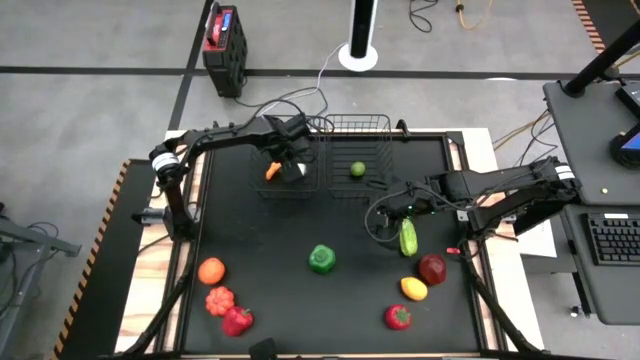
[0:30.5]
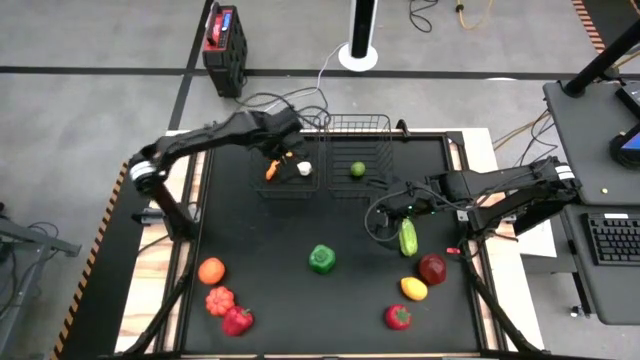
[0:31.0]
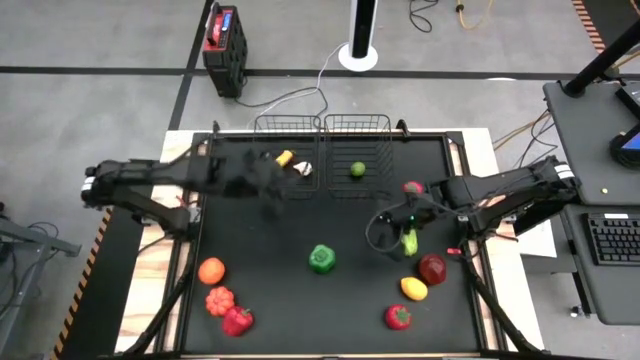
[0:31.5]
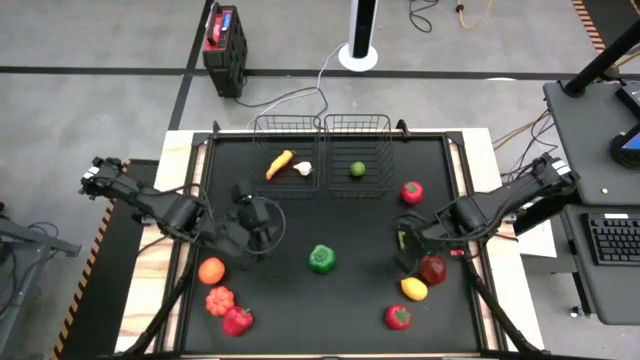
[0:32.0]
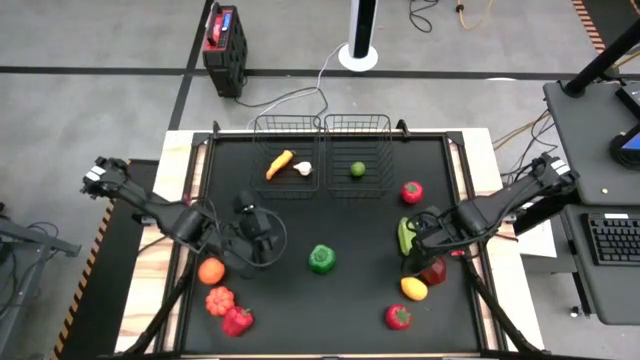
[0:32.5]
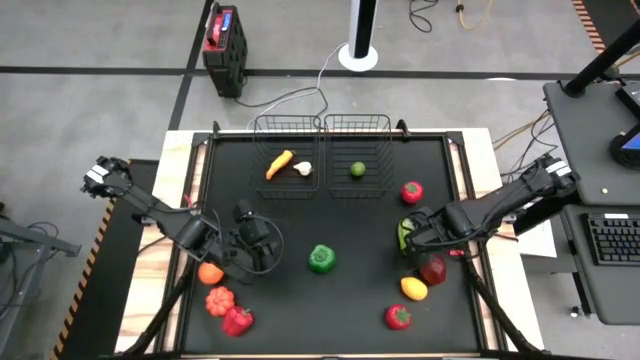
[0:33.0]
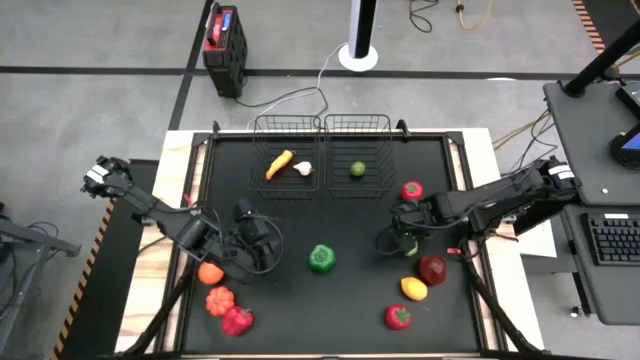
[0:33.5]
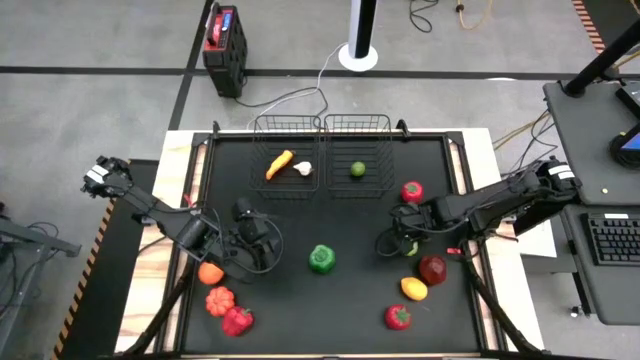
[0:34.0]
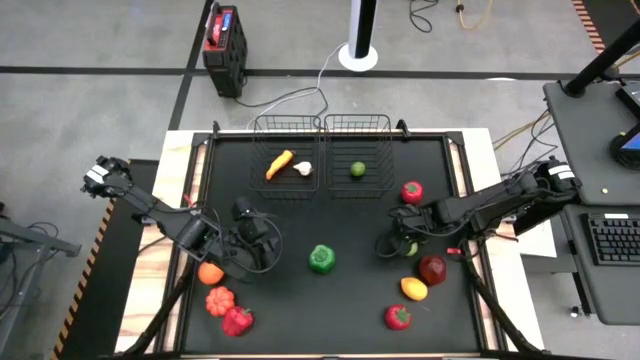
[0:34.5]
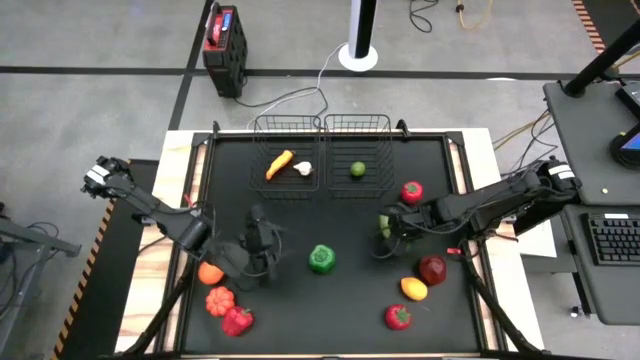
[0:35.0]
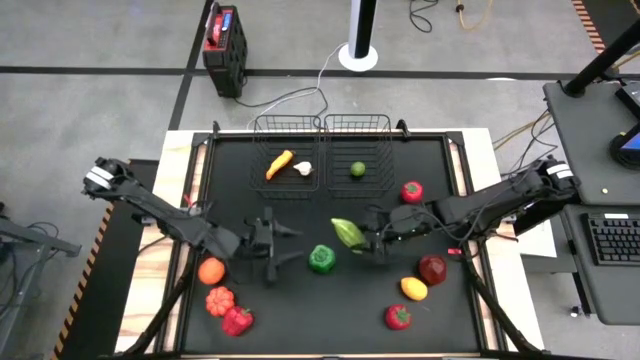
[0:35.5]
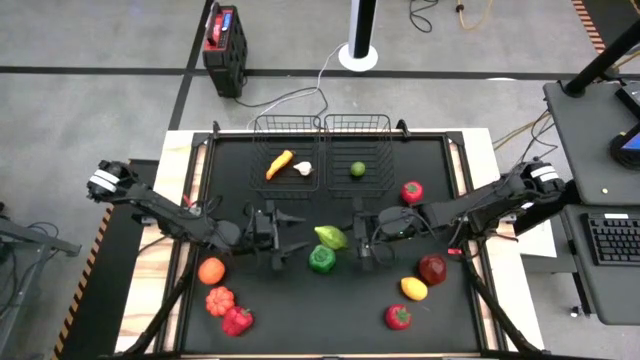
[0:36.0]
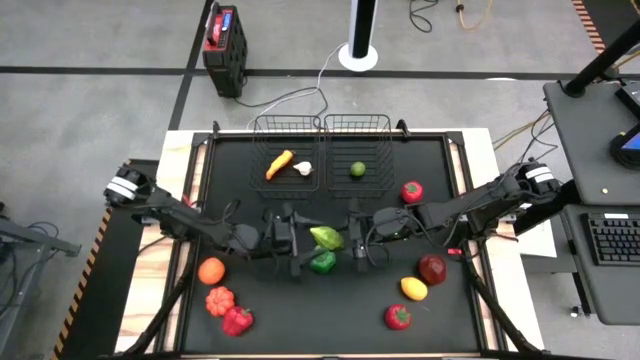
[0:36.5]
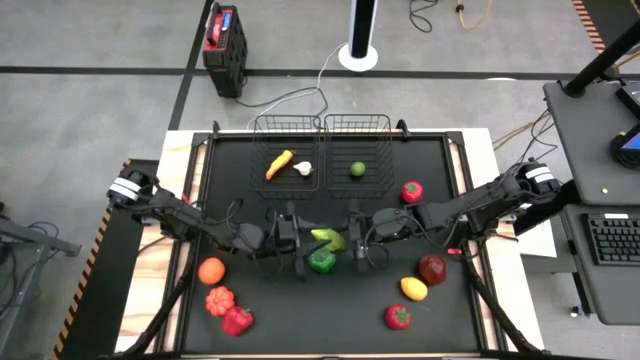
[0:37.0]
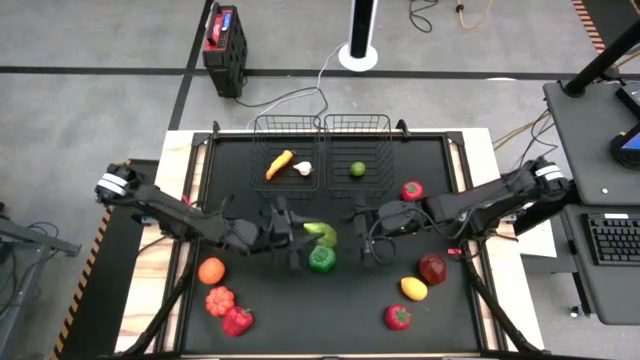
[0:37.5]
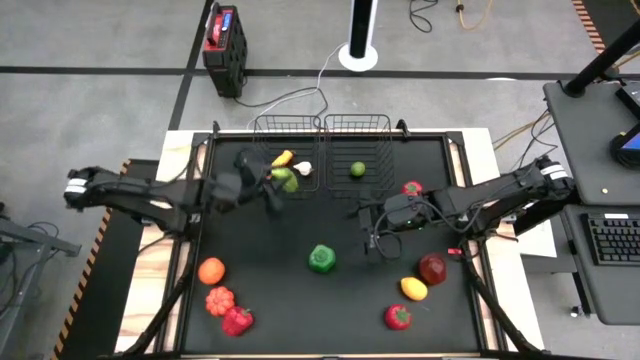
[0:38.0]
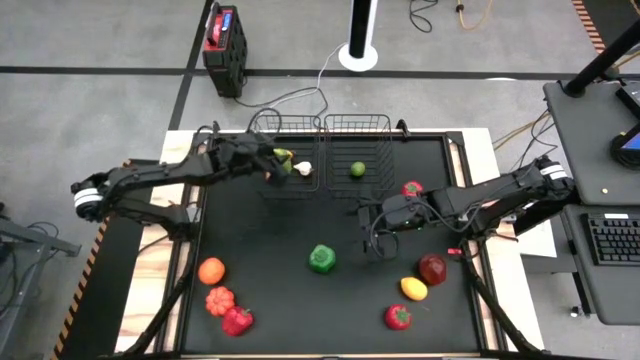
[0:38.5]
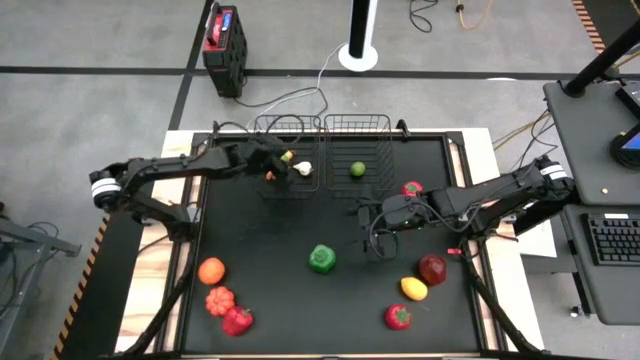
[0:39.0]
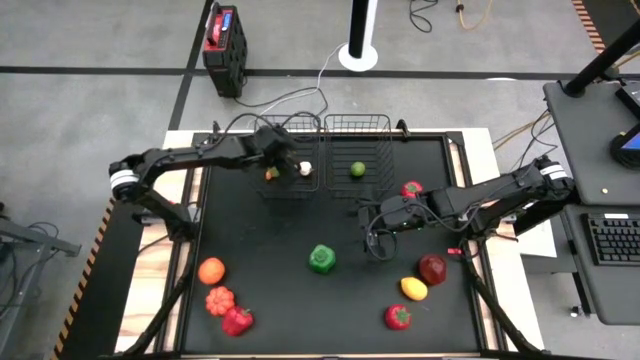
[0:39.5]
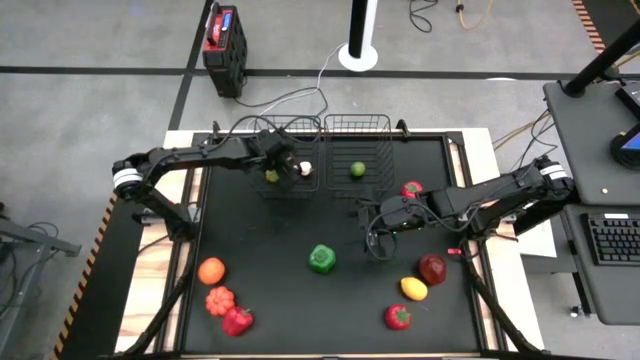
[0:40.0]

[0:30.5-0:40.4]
Task: Sort produce into baskets
Put the green luffa into the left wire basket

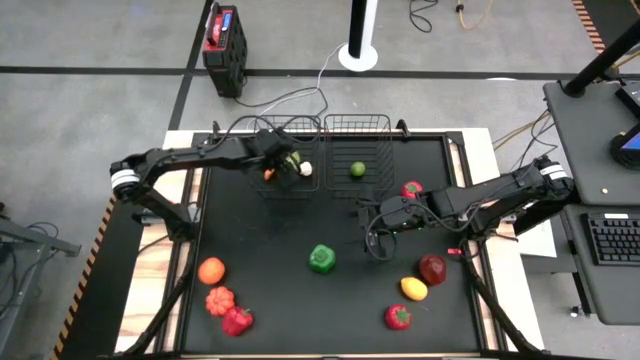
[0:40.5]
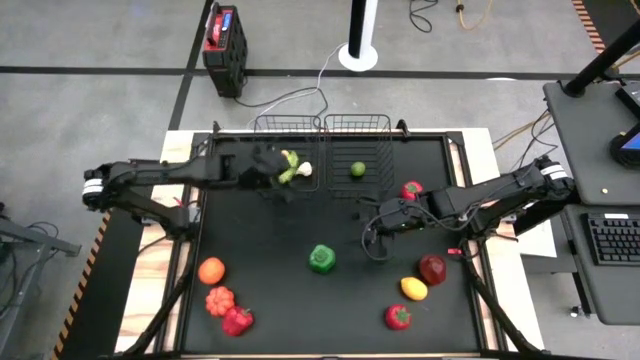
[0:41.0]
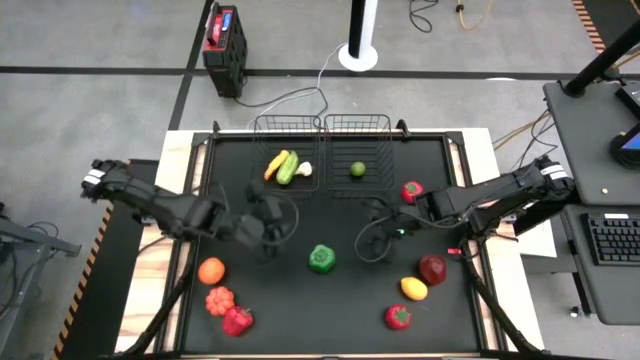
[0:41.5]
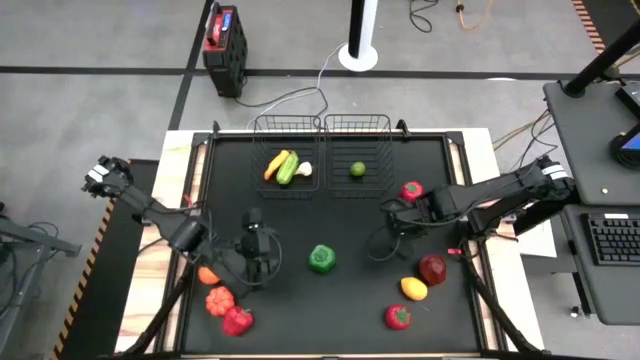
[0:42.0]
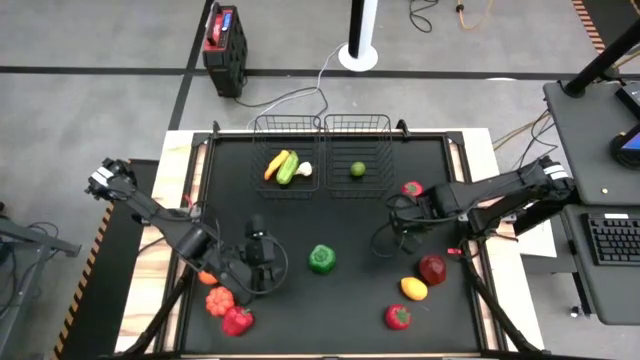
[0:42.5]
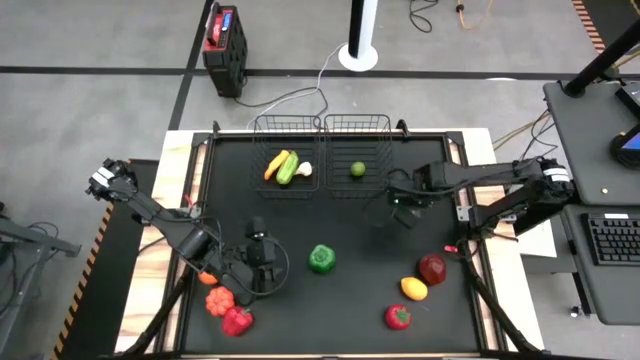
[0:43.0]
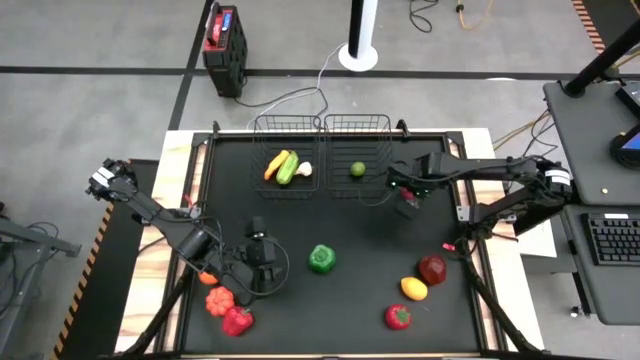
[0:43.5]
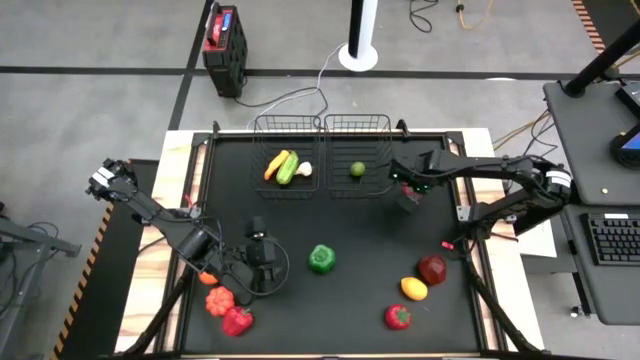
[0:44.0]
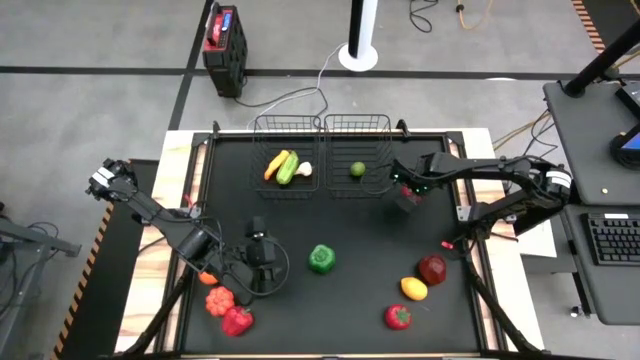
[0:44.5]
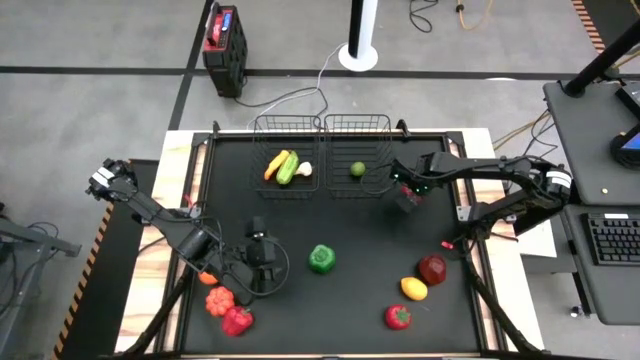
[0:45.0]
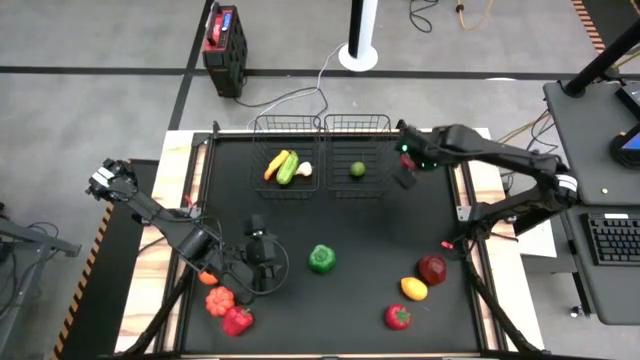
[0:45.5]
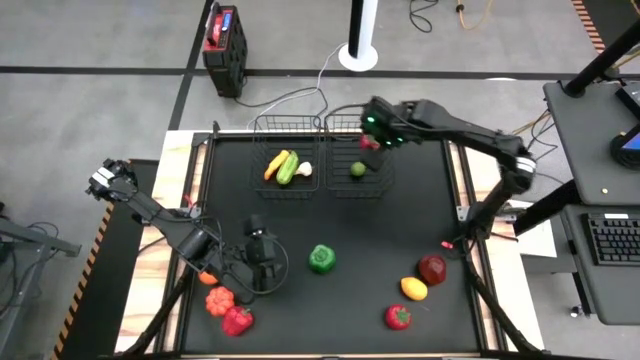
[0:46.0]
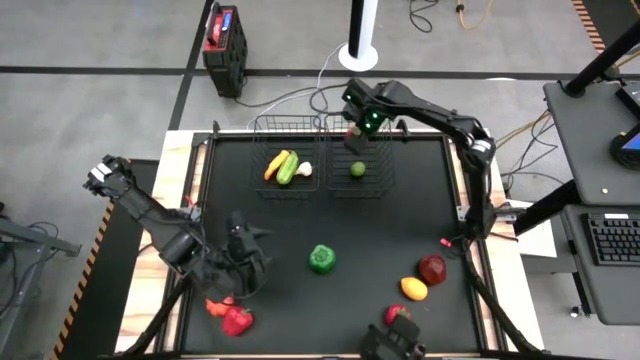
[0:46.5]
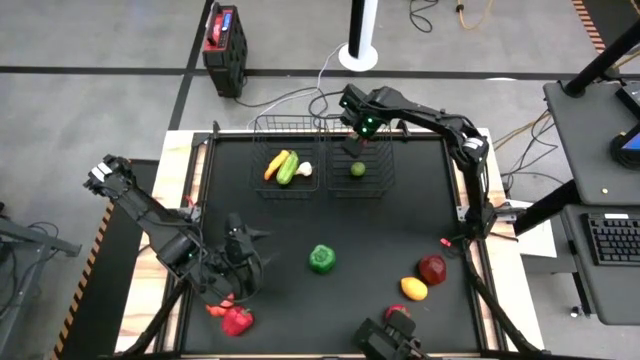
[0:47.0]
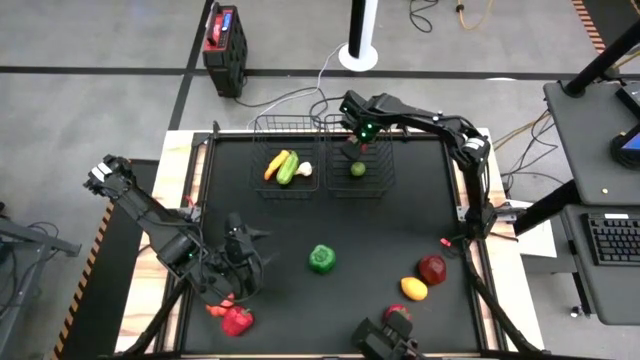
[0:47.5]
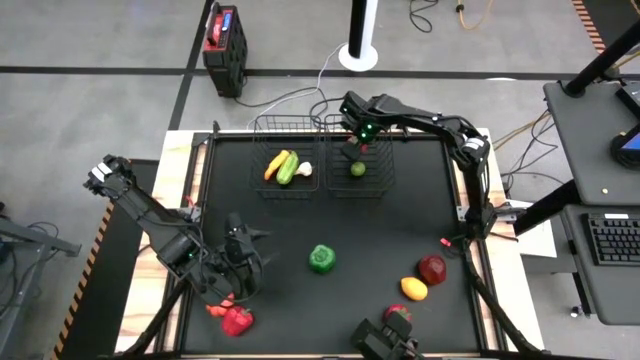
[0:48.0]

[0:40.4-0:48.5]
Put the tomato into the right wire basket

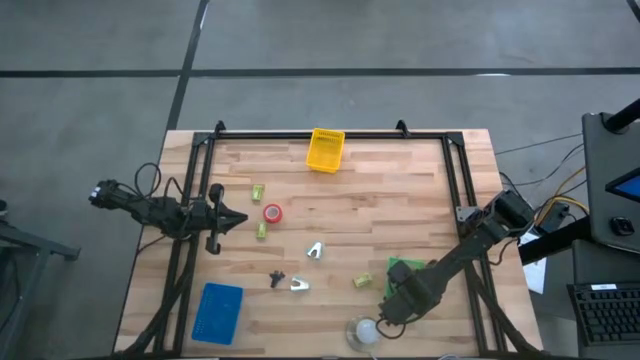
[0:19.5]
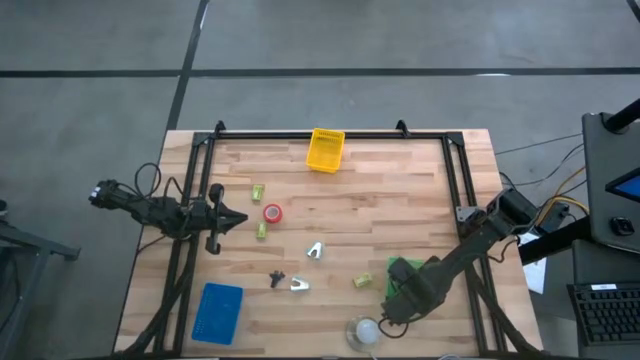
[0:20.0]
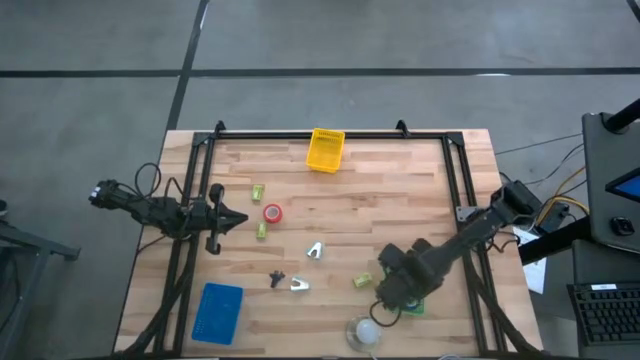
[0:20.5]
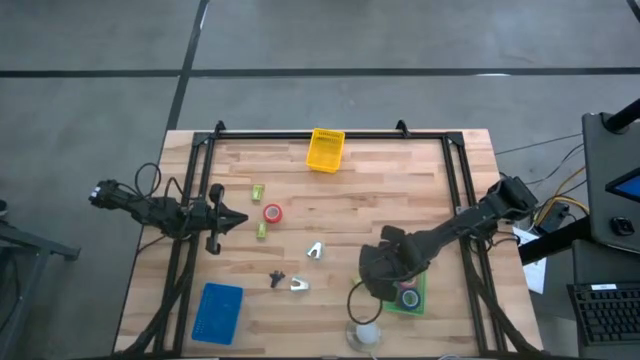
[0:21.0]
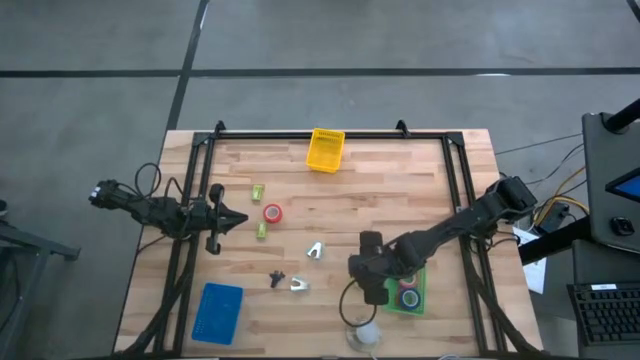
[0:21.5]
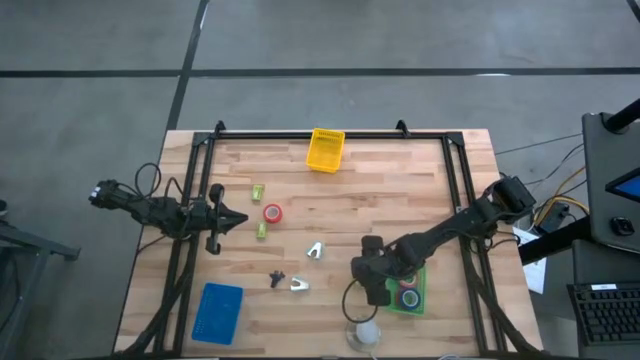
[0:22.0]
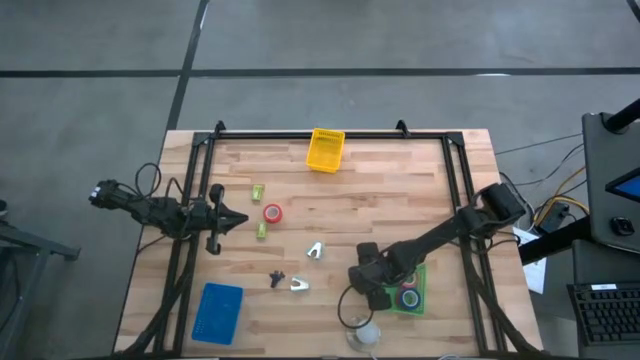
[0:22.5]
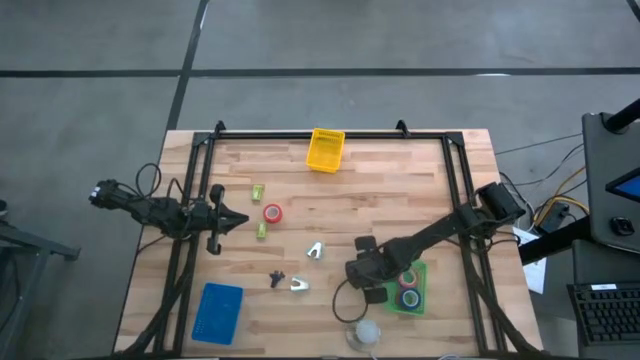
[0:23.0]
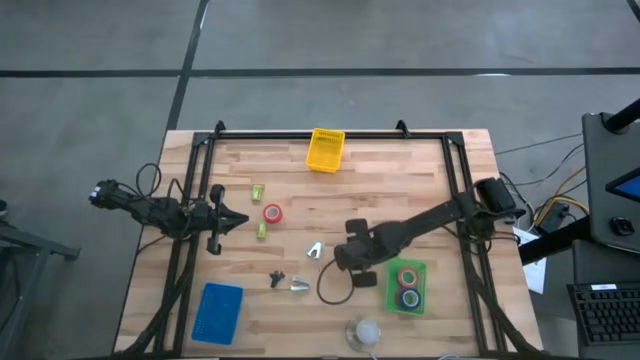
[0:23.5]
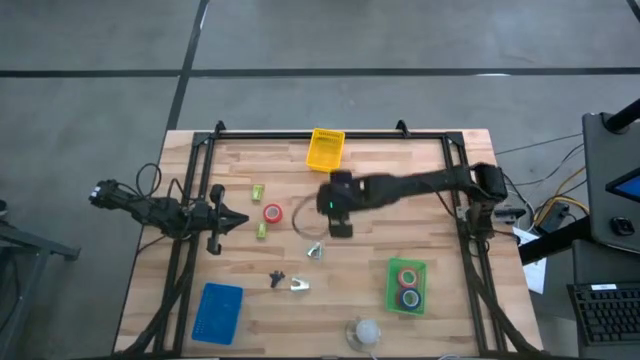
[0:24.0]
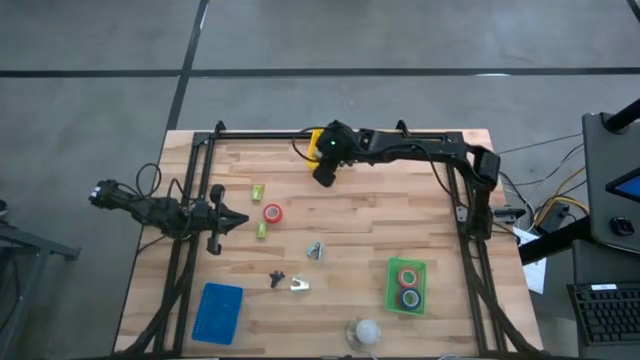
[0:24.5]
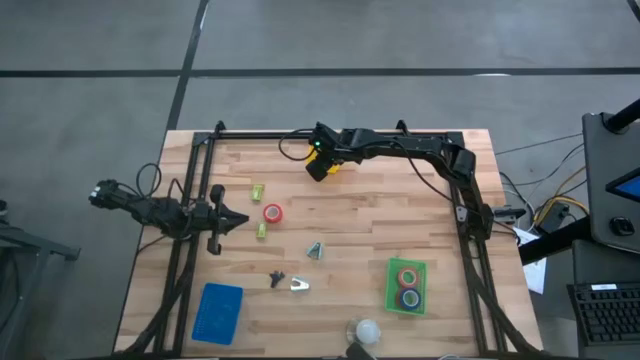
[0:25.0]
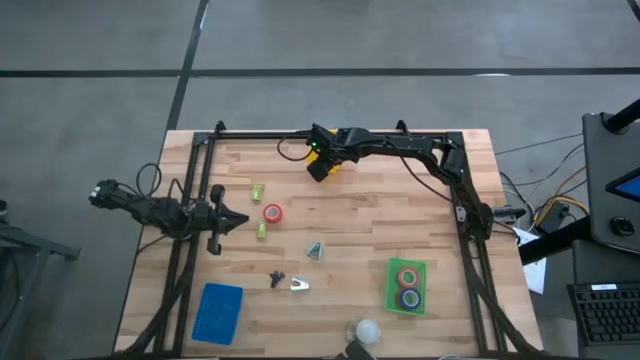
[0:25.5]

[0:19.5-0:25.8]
Task: Pick and place Stapler, Stapler remover, tape
Put the bottom staple box into the yellow bin
